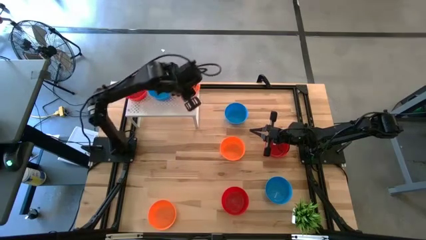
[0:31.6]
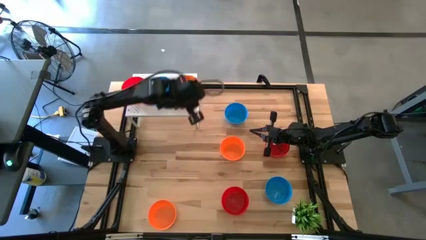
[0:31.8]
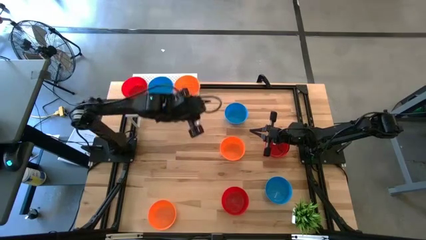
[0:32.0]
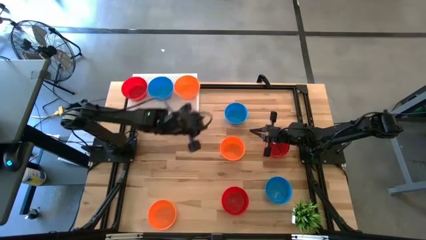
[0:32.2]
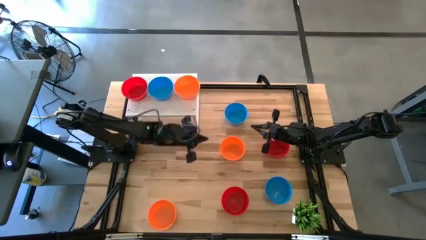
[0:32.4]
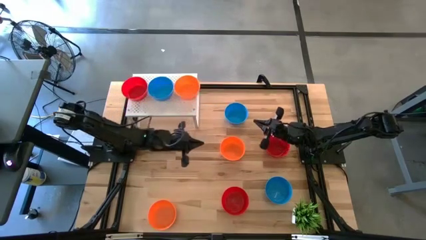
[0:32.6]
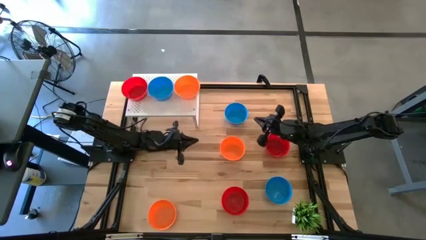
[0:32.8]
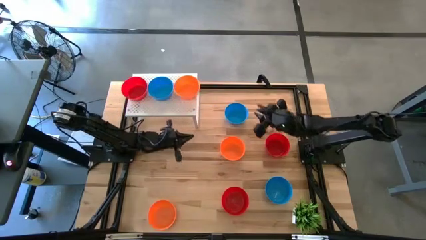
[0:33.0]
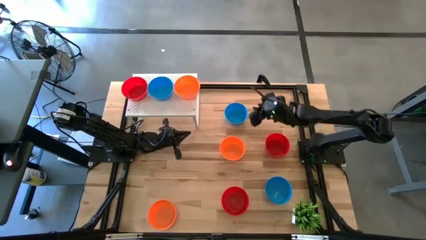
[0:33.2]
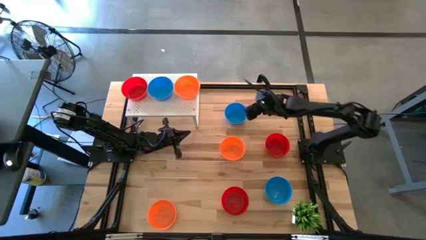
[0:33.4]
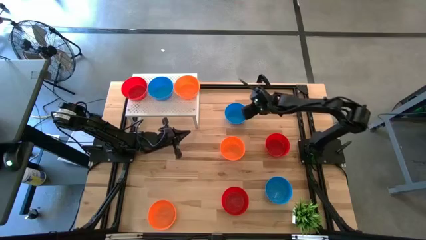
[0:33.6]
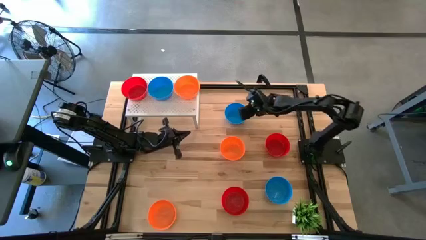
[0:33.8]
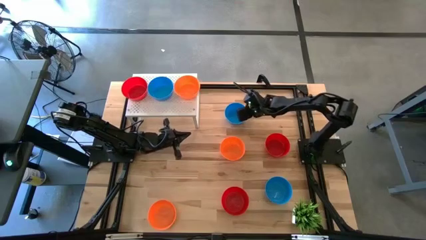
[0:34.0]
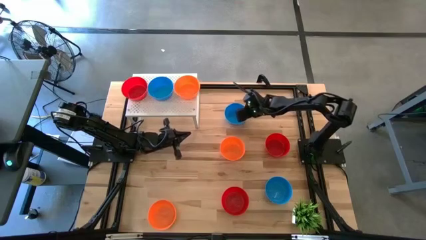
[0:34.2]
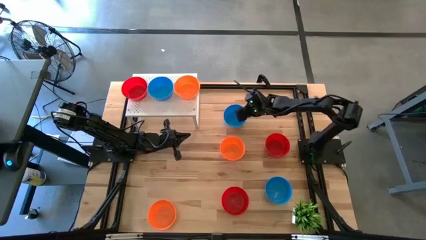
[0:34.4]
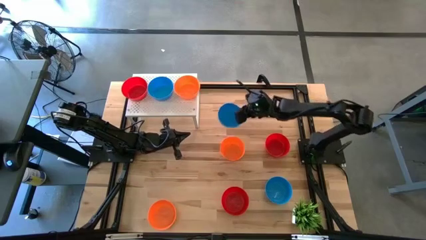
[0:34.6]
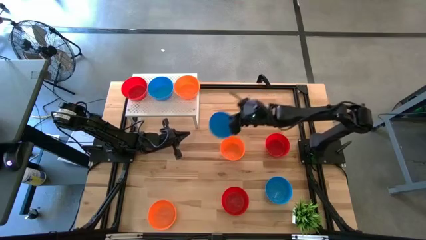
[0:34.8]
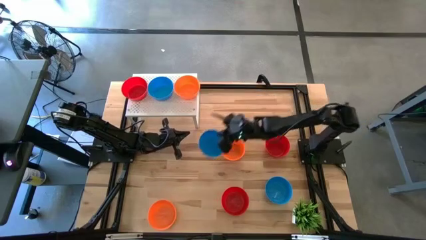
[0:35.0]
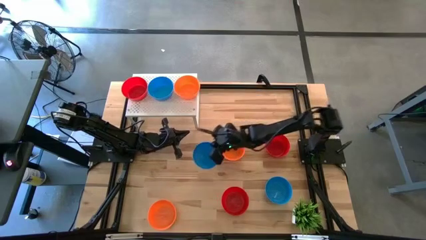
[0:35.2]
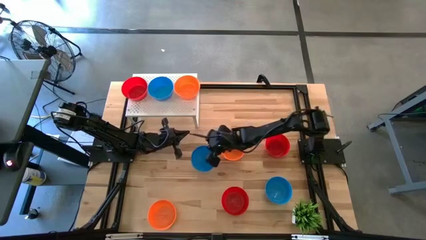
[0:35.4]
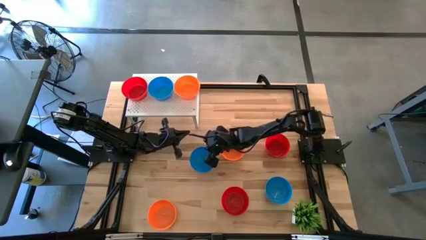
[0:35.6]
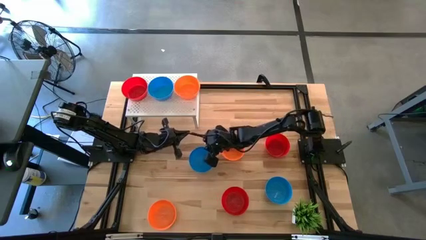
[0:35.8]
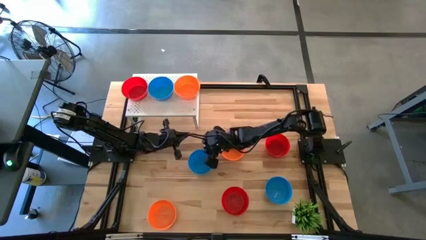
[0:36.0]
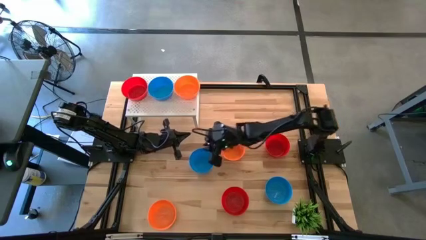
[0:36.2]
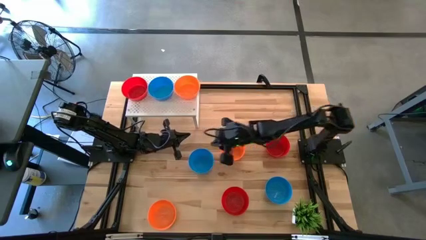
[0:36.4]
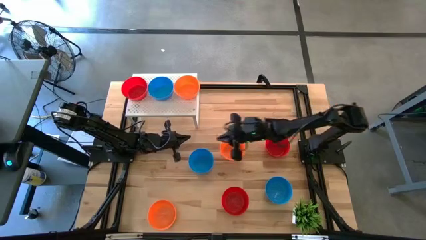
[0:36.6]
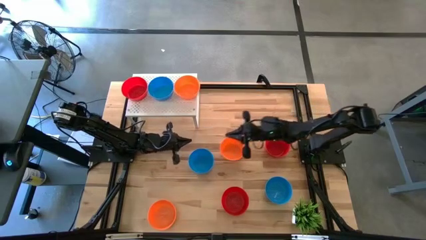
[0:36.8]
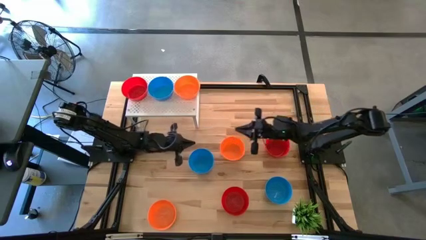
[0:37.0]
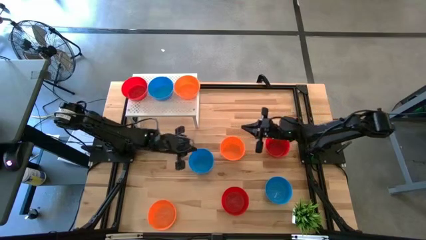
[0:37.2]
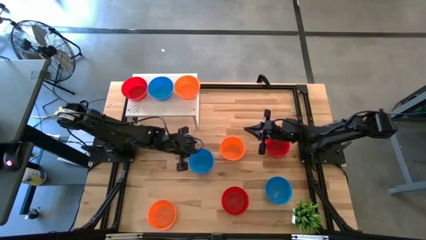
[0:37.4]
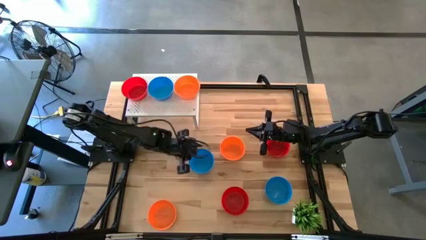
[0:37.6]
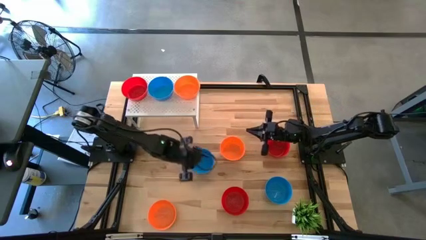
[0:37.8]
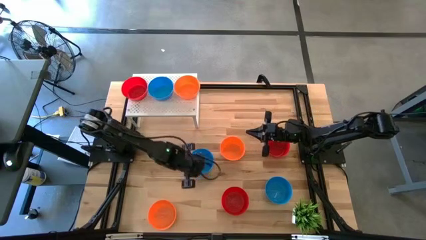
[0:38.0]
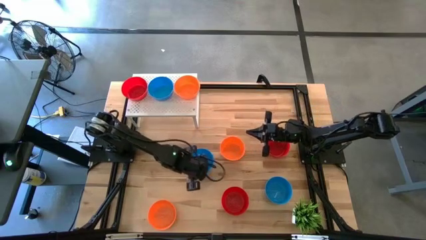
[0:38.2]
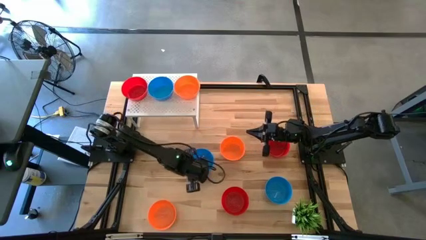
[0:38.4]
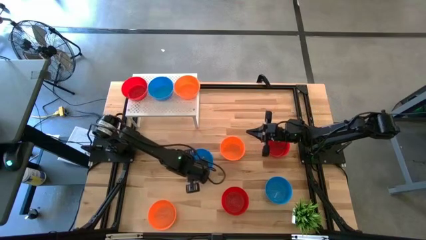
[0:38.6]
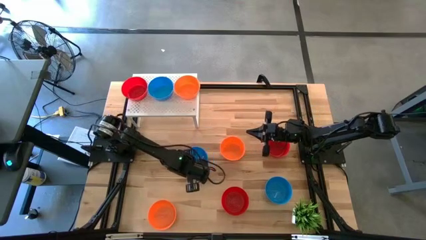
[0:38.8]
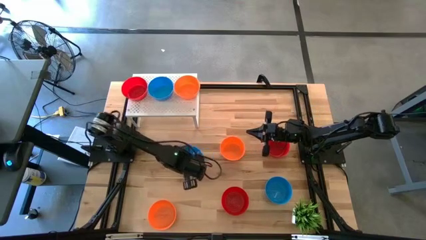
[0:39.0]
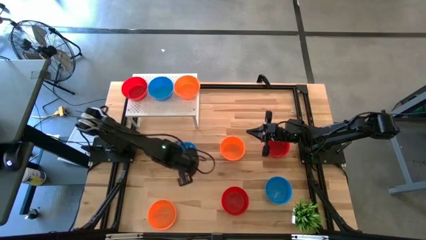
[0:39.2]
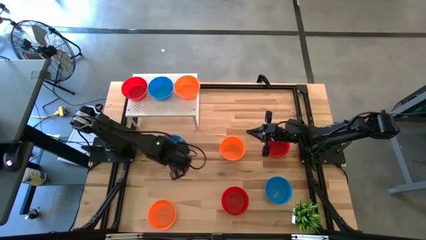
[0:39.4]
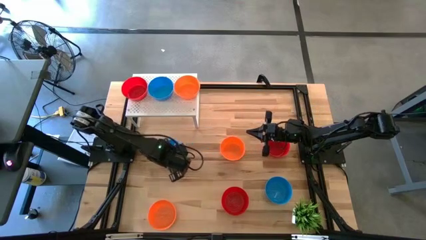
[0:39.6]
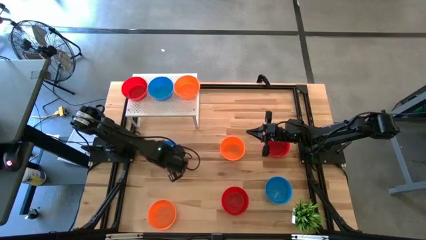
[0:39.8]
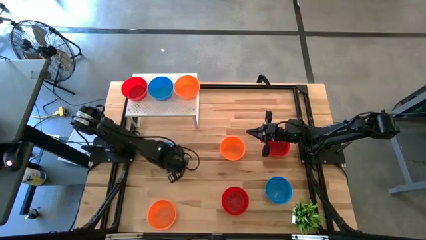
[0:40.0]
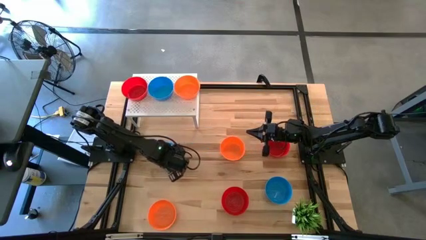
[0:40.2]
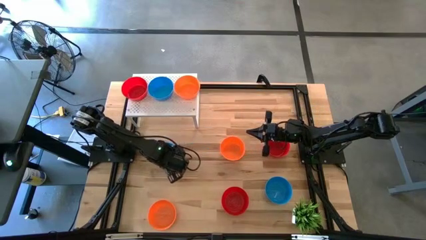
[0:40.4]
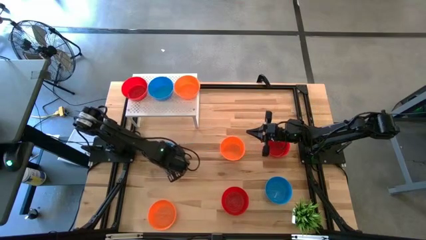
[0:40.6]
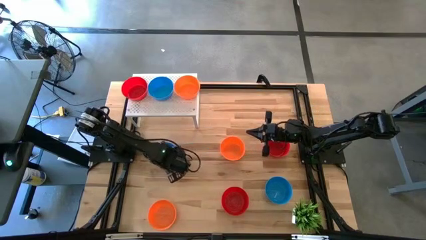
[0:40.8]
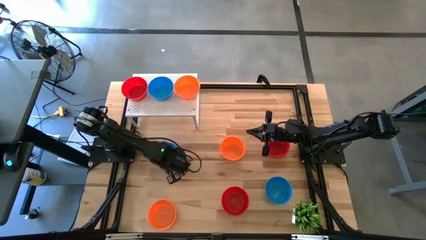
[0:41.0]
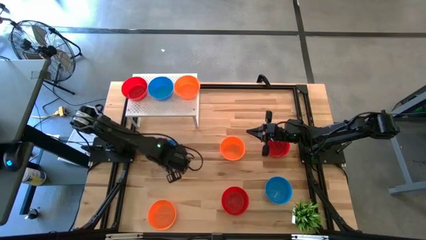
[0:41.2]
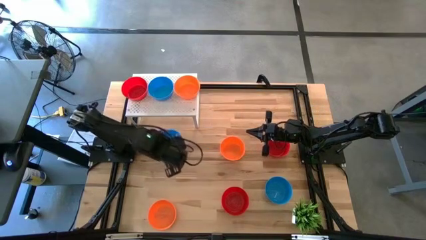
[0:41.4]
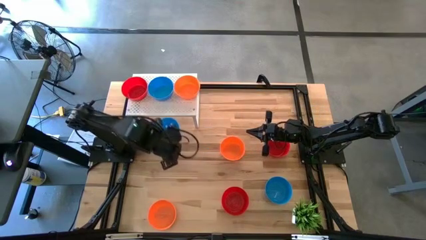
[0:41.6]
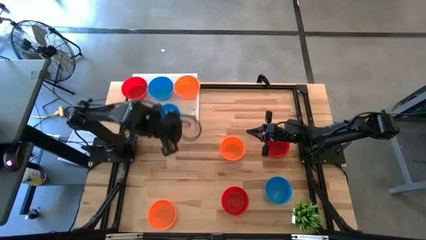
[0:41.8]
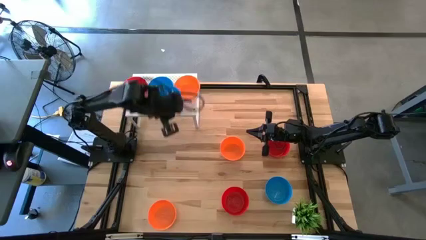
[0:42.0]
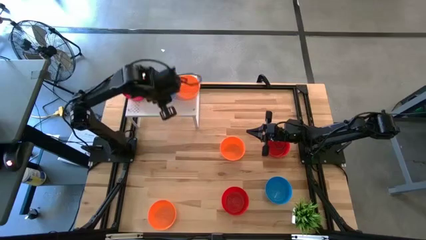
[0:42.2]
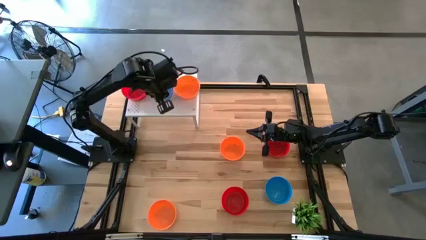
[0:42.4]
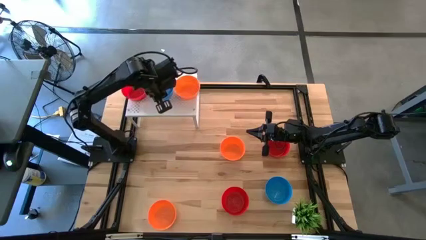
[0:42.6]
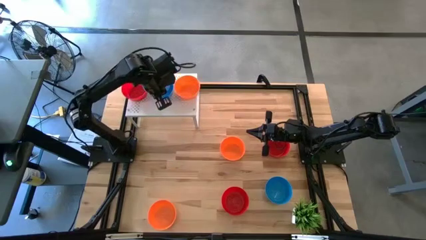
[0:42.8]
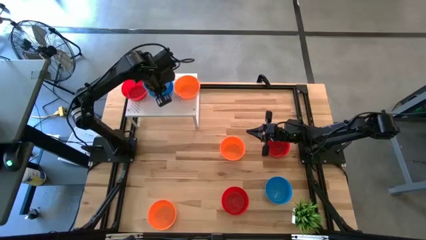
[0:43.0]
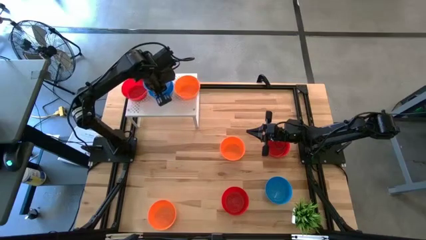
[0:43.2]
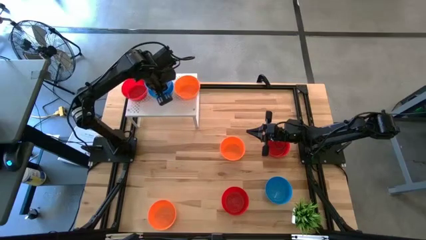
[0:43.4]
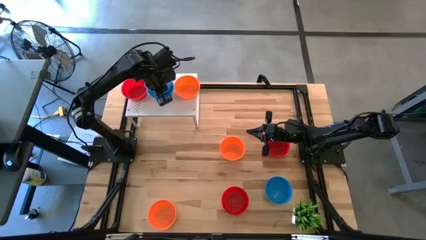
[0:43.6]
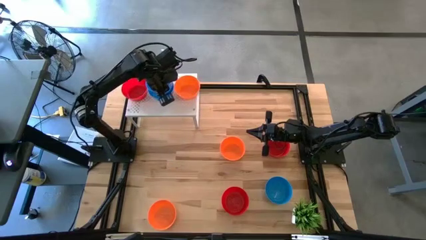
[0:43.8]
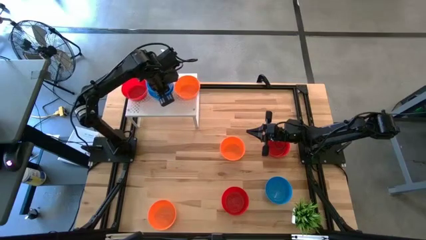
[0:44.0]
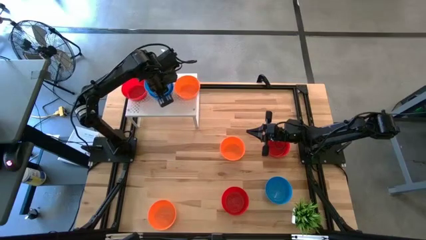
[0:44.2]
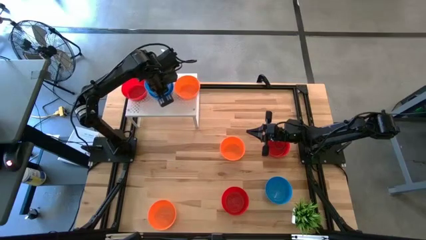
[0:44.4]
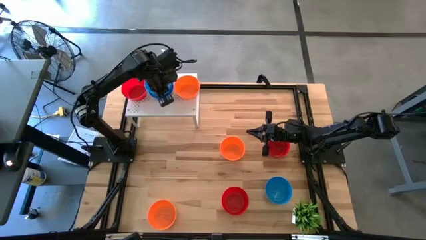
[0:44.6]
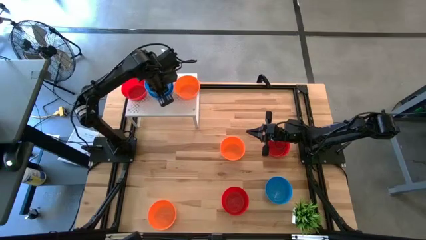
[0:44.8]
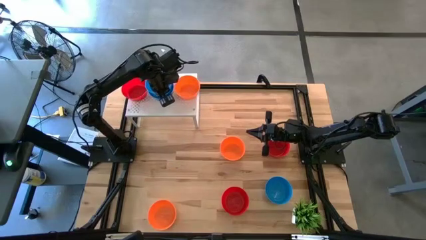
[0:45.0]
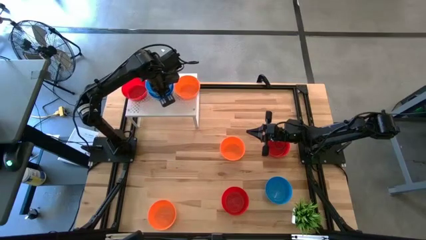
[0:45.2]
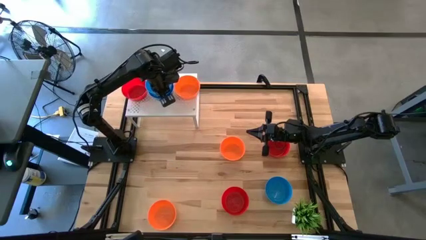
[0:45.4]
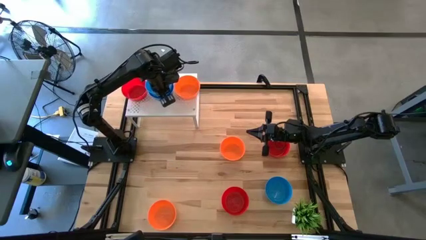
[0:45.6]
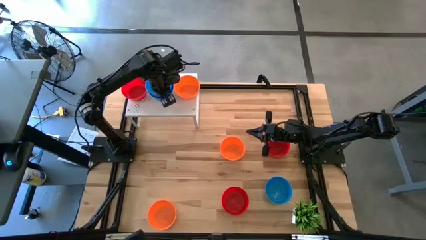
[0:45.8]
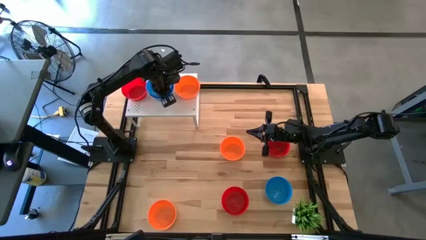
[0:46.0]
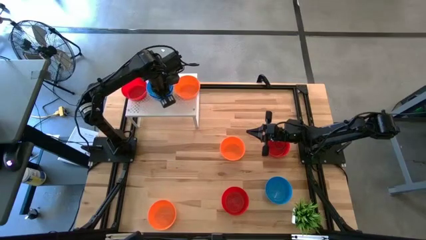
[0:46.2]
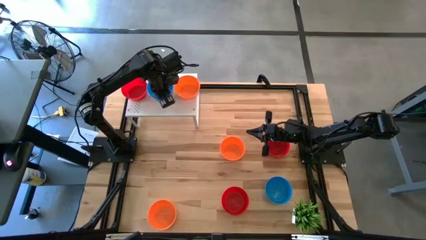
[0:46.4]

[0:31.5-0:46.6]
Task: Pick & Place Mini bowls
Stack the top blue bowl on the blue bowl on the shelf
